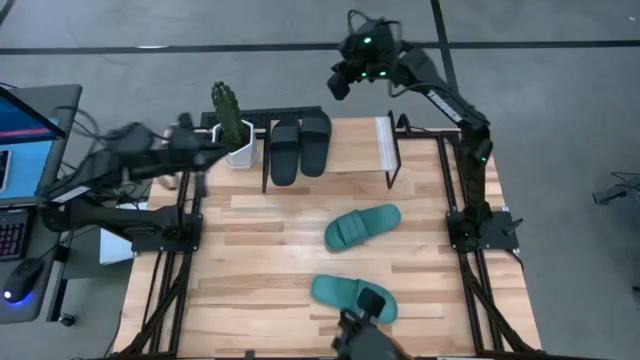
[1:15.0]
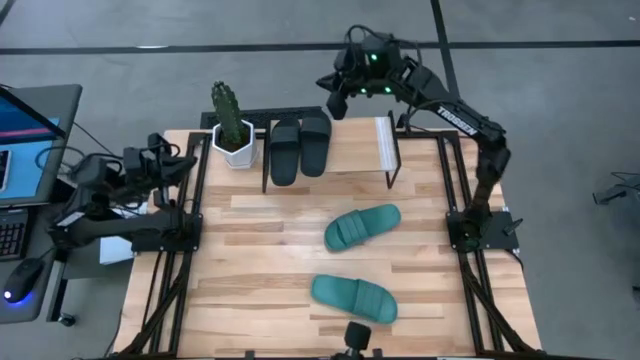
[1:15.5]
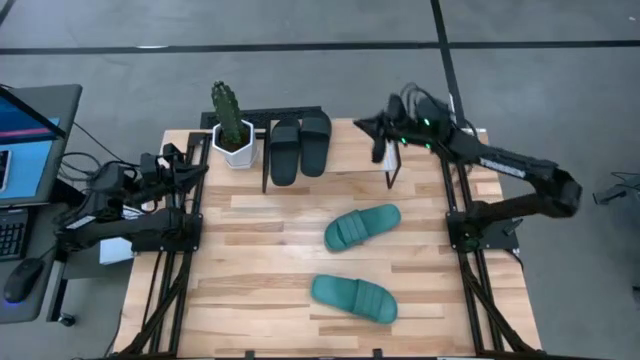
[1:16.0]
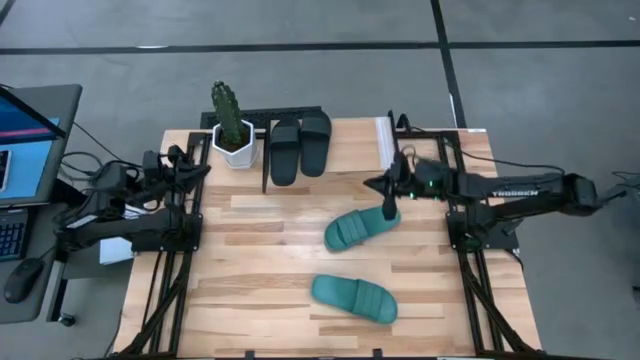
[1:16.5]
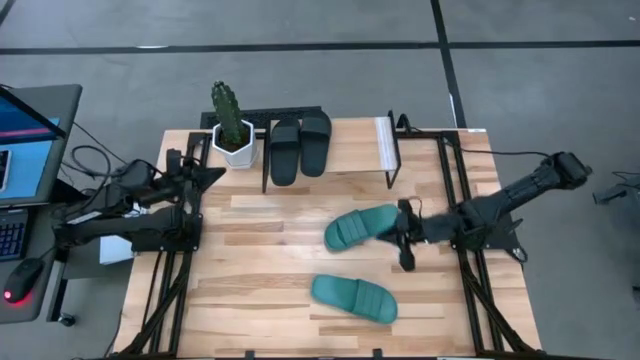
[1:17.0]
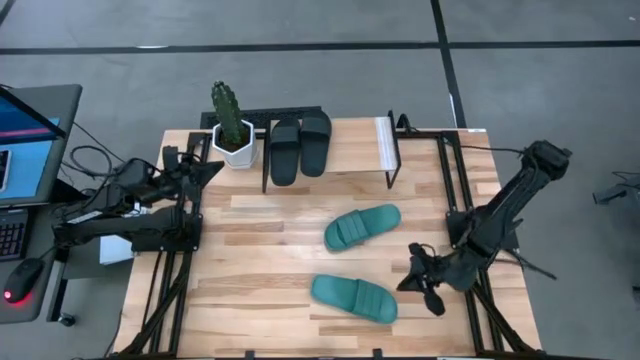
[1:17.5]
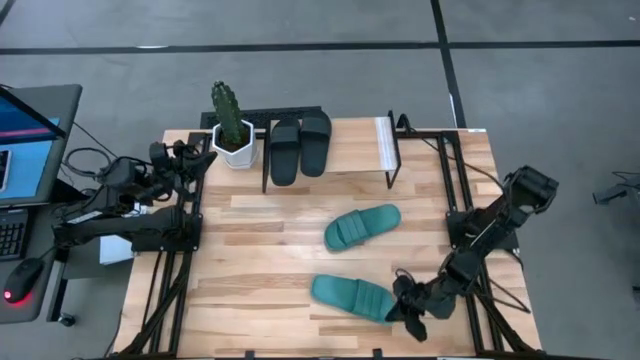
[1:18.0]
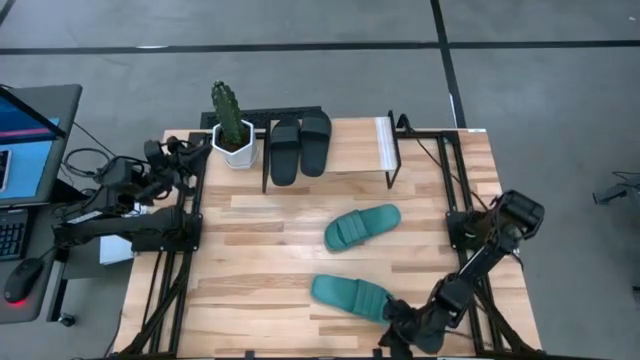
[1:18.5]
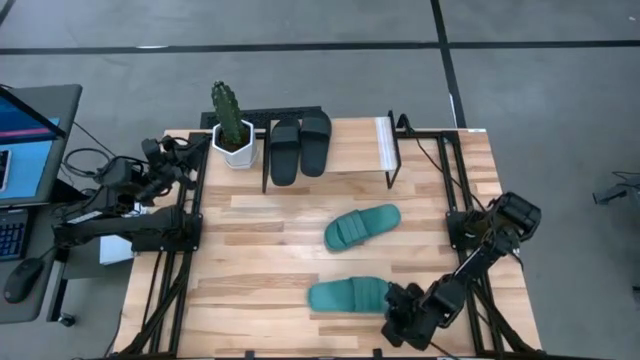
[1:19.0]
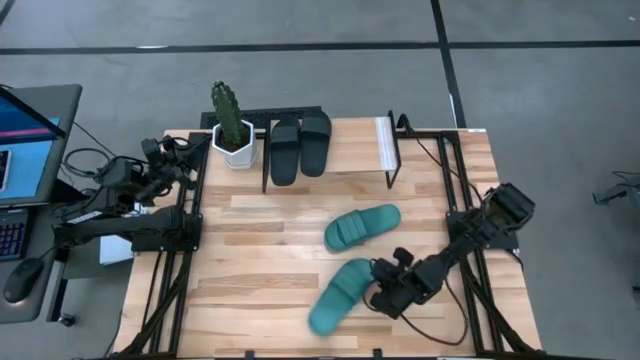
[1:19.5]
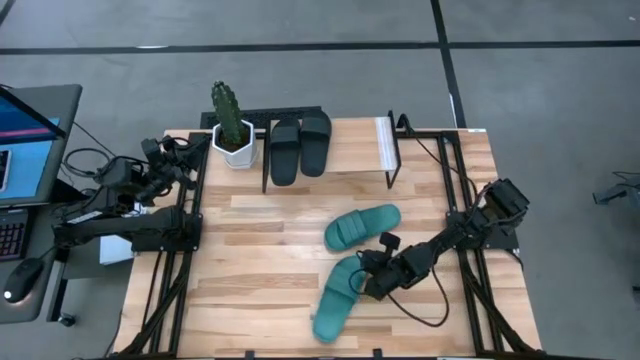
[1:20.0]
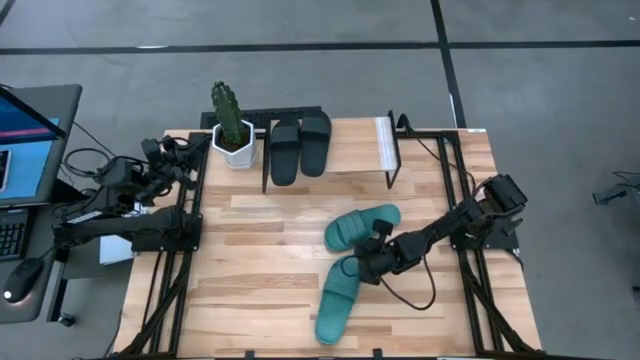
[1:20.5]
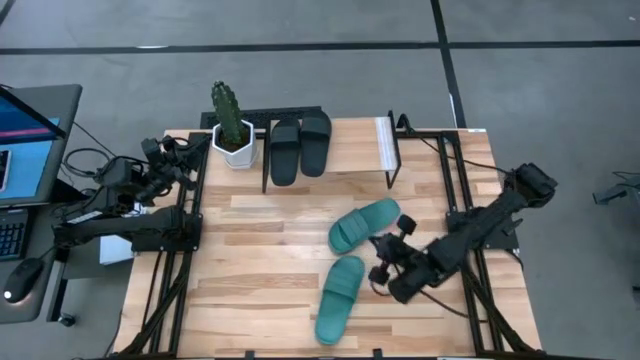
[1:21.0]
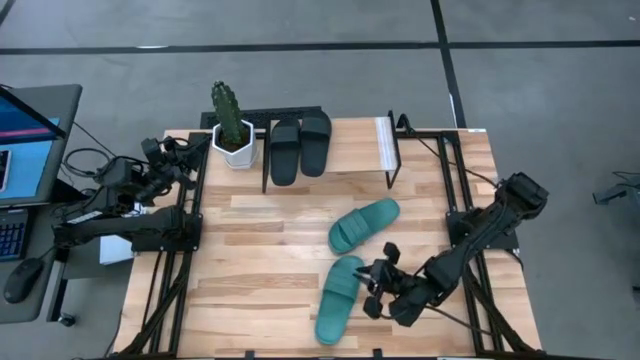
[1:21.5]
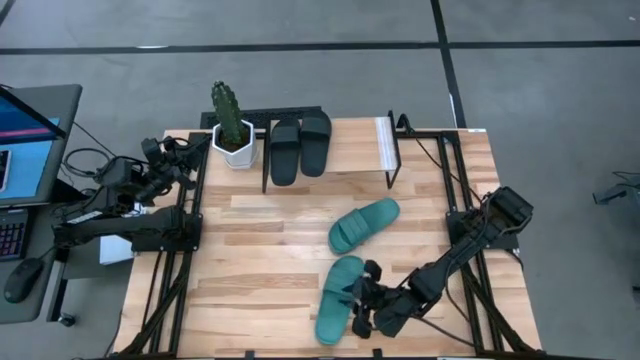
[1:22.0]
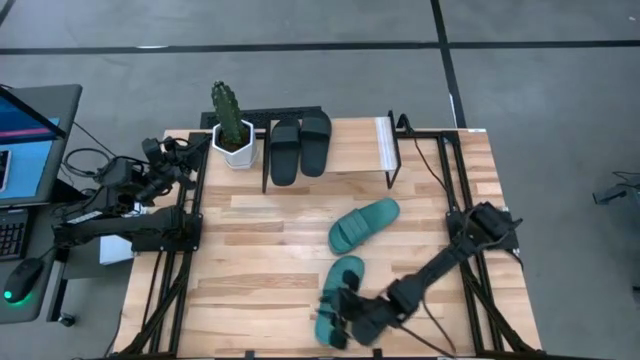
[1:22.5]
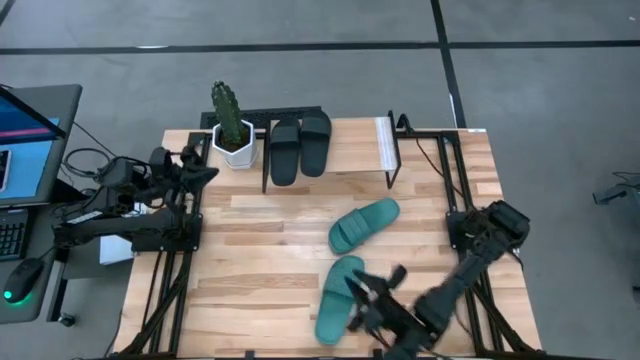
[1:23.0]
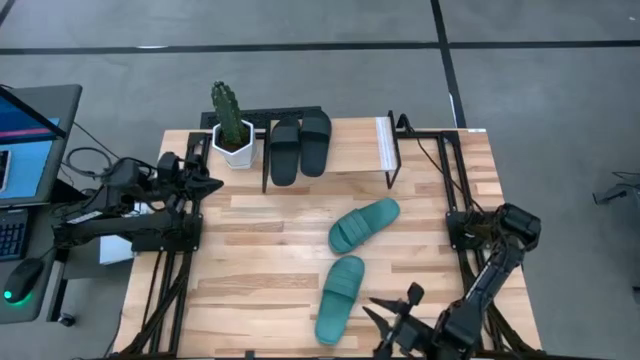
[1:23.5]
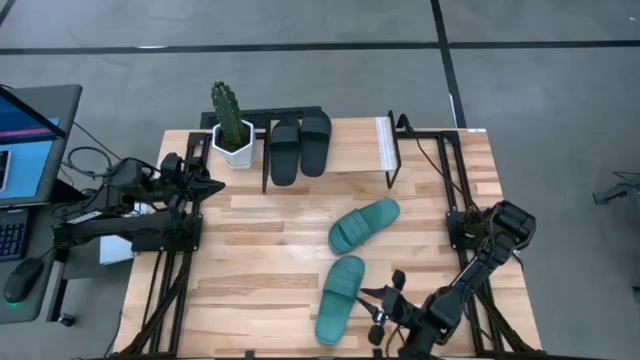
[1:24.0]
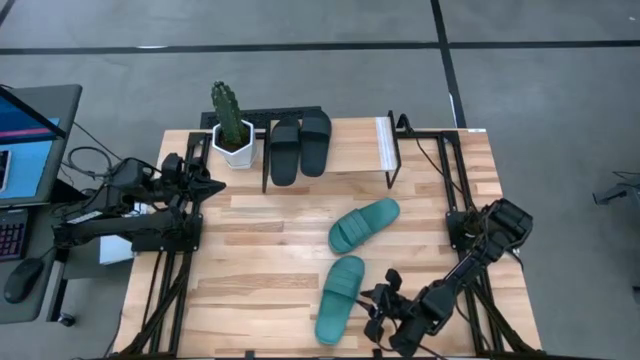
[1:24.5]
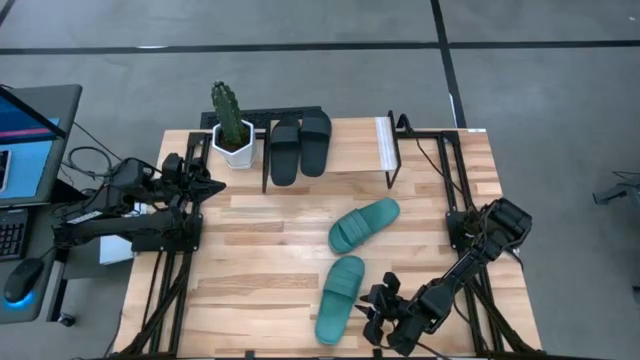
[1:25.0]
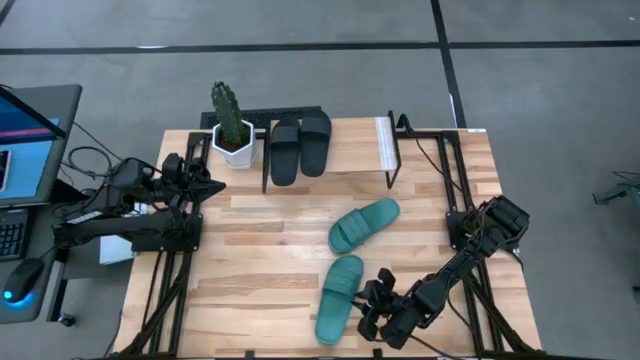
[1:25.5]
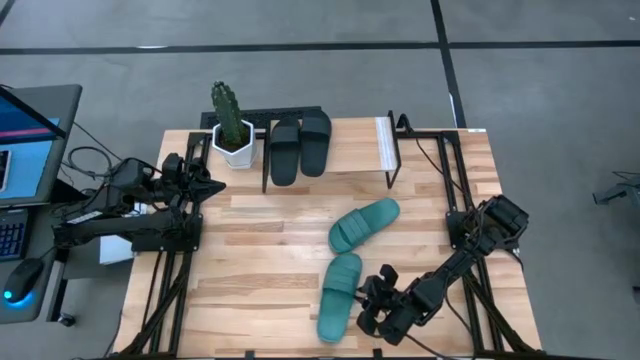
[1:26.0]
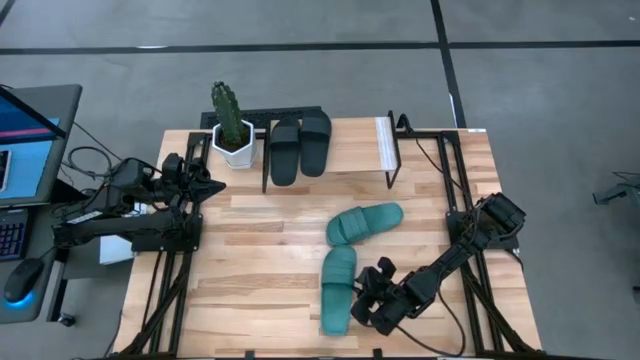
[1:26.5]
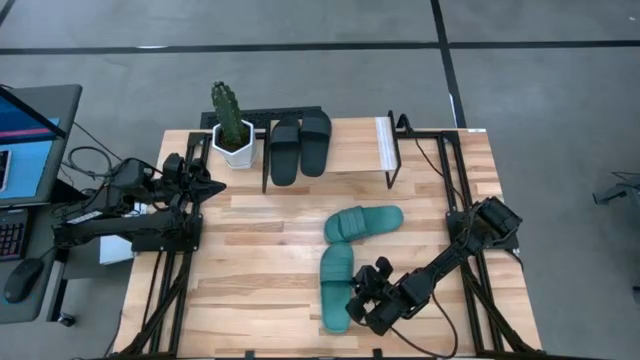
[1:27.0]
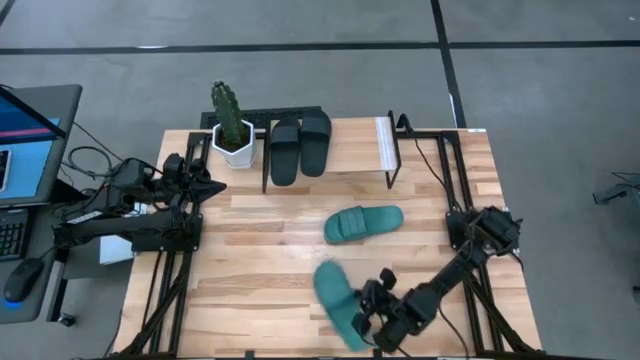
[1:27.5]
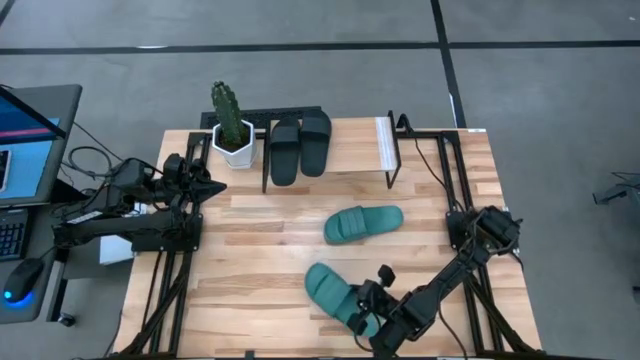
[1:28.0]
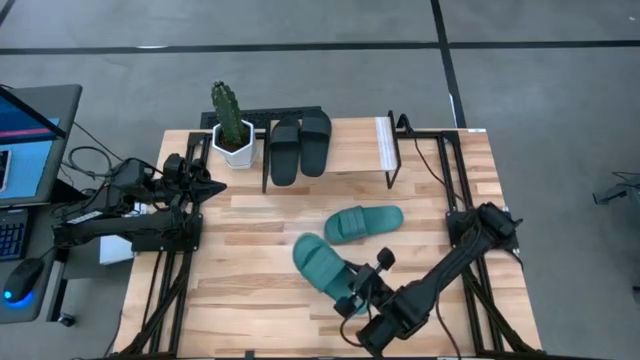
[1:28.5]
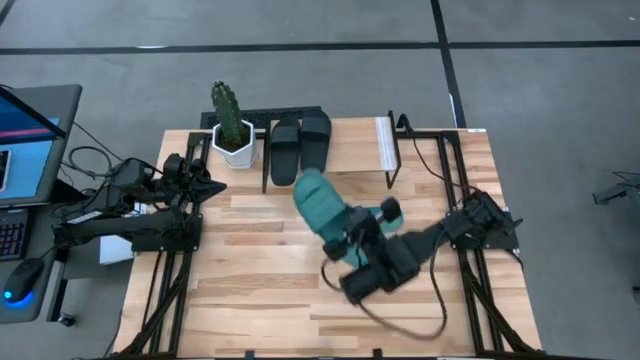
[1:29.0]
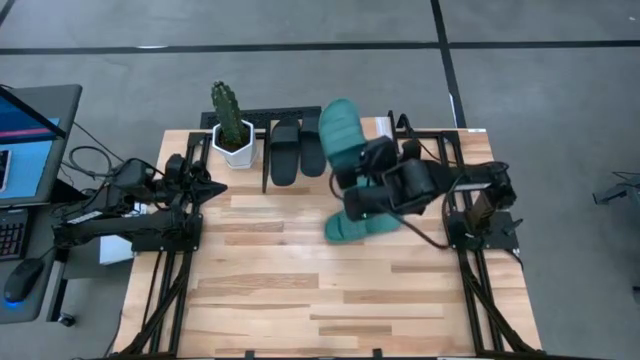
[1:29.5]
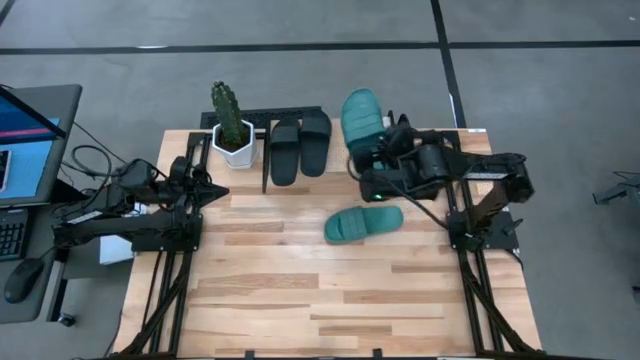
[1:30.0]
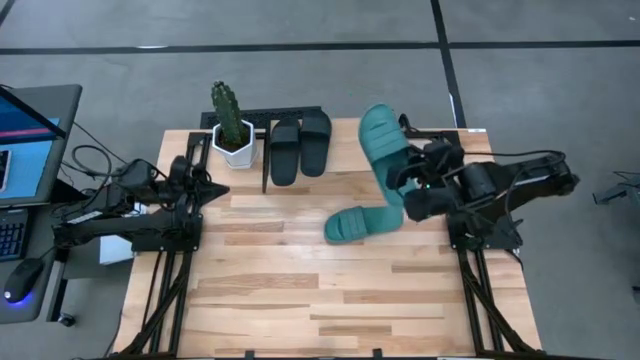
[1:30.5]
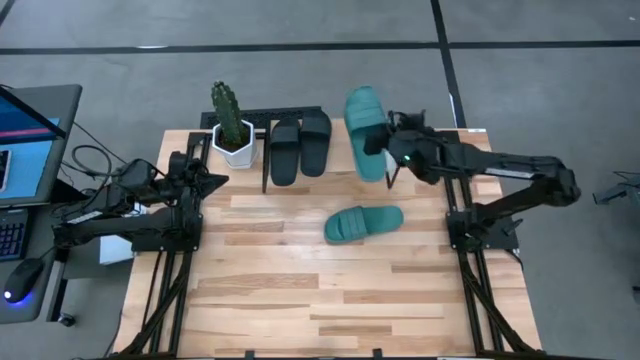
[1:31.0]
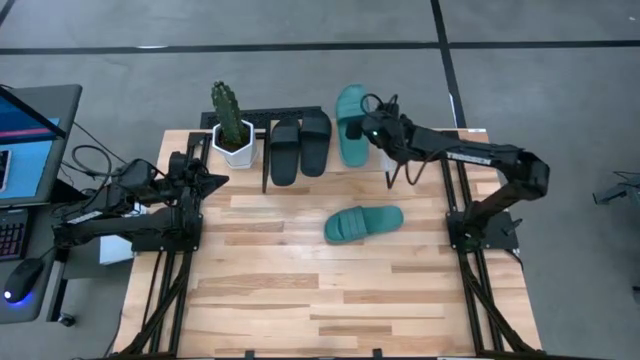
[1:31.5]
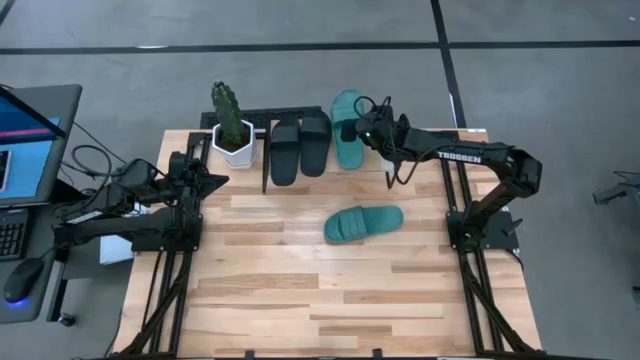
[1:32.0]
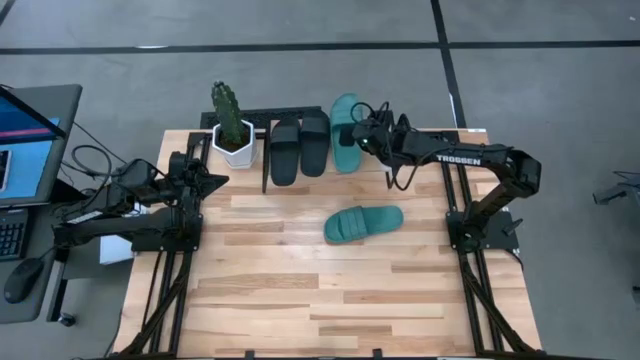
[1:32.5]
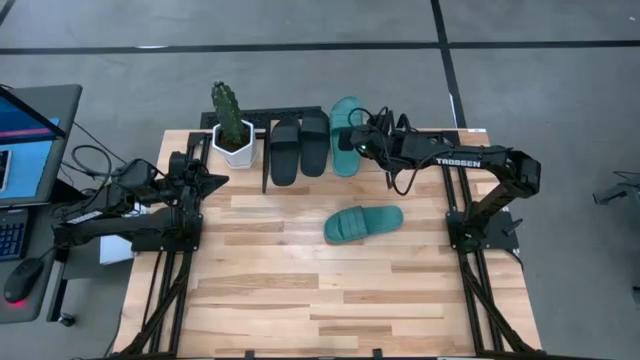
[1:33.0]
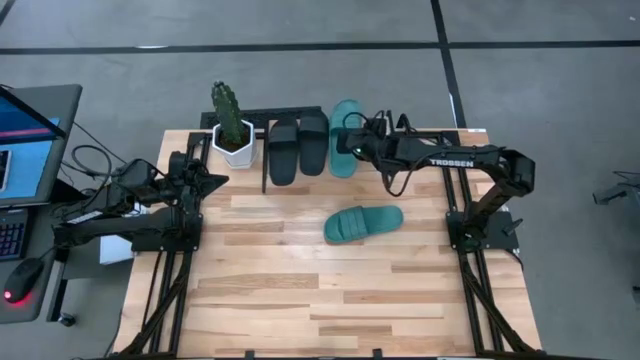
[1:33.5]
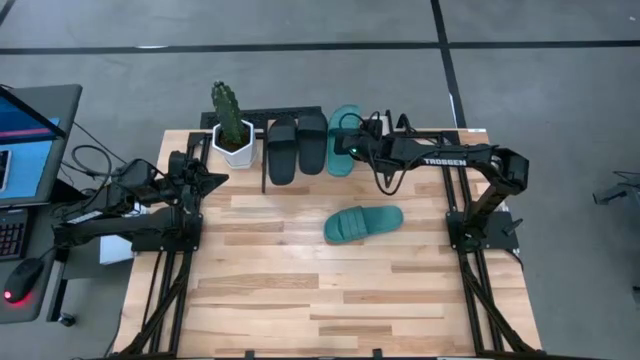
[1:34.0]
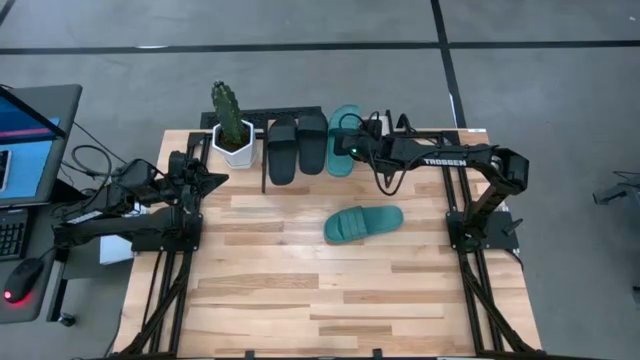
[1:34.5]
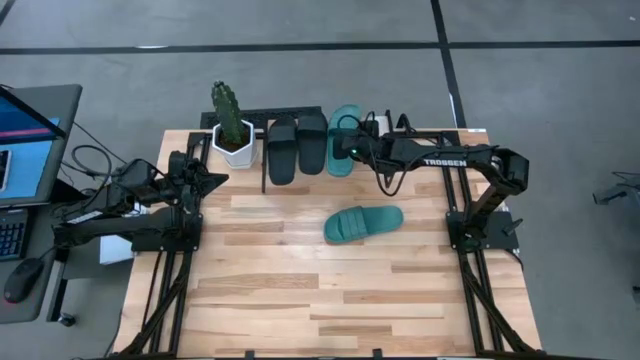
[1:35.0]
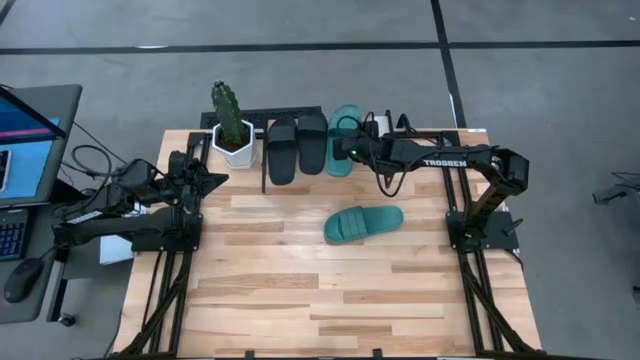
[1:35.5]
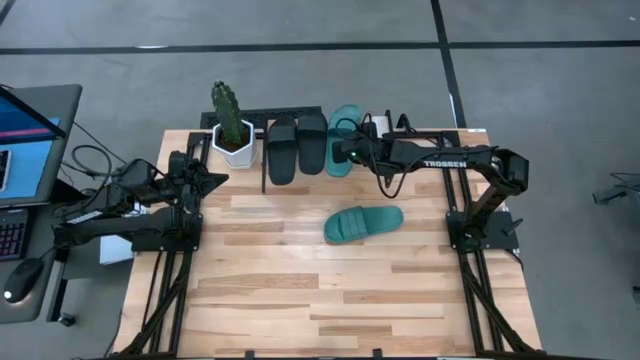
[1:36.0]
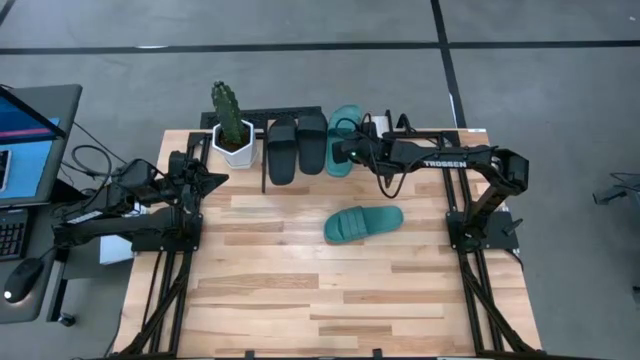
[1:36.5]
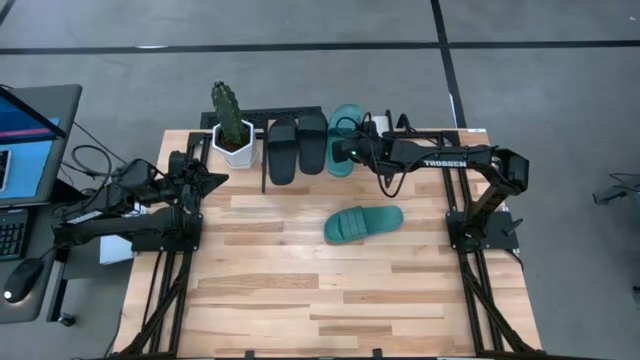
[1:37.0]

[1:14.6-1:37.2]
Task: Pick and place slides into the shelf
Put the top green slide on the shelf
